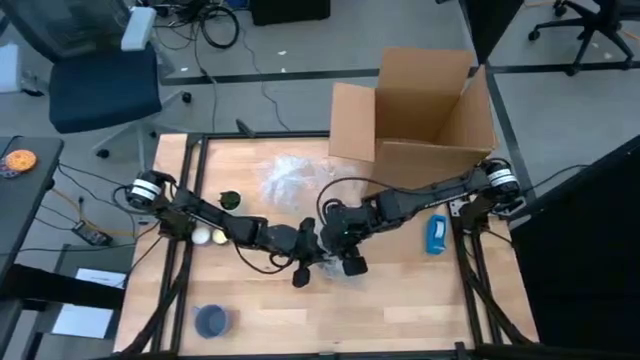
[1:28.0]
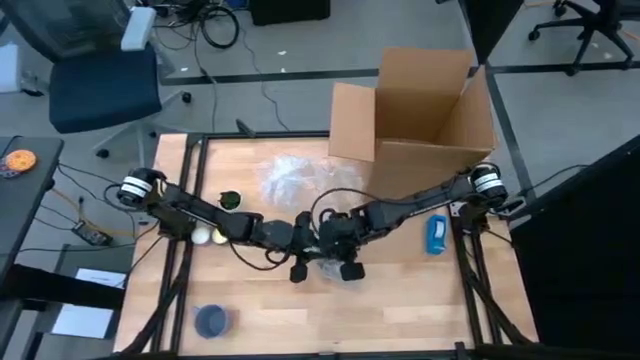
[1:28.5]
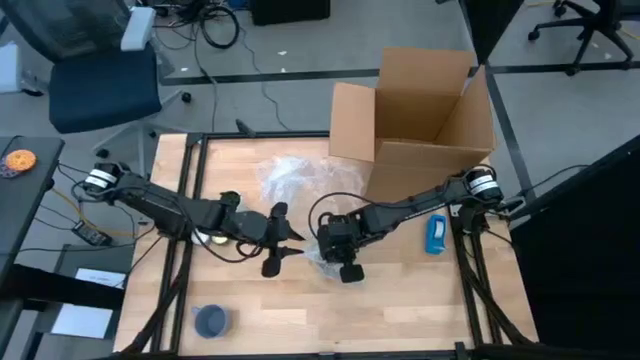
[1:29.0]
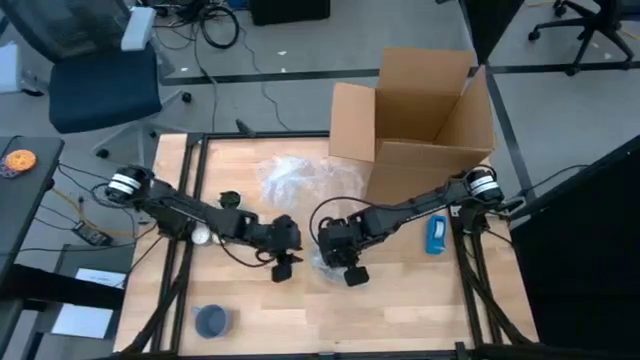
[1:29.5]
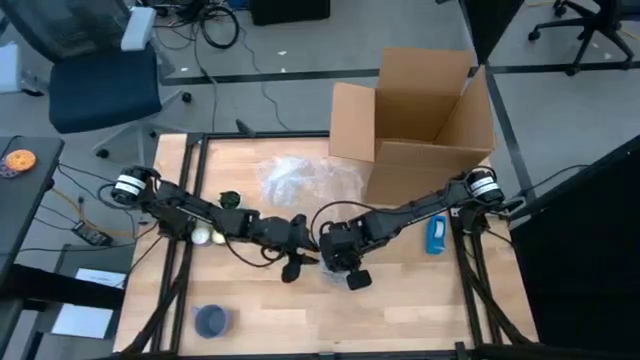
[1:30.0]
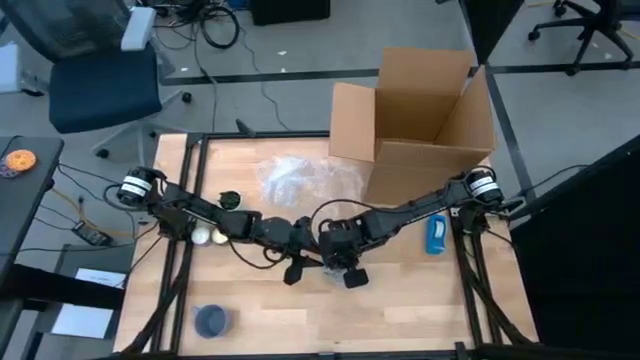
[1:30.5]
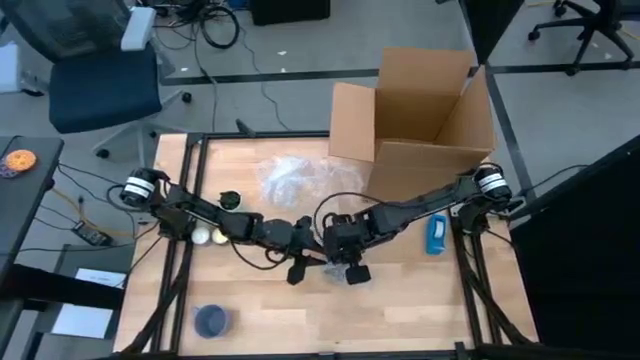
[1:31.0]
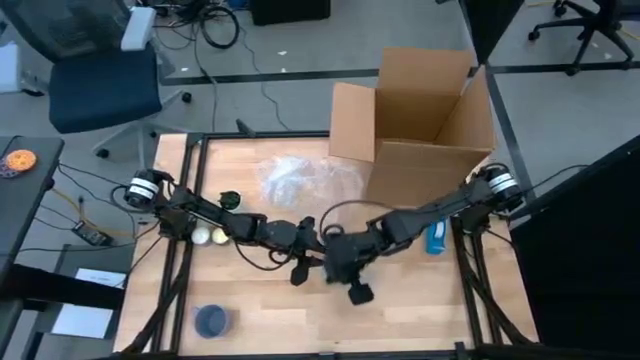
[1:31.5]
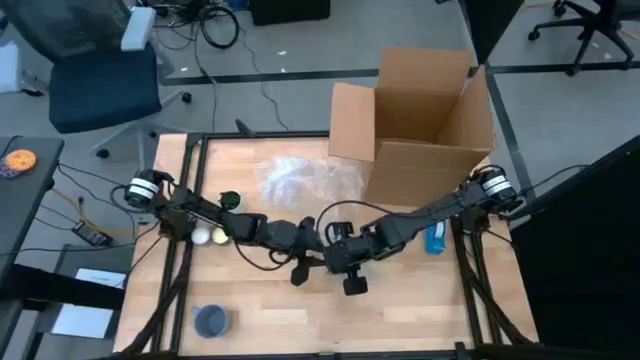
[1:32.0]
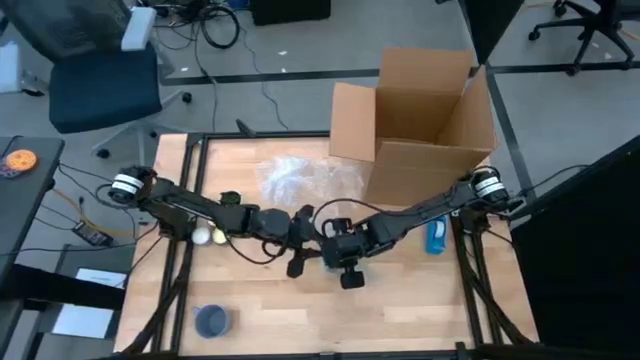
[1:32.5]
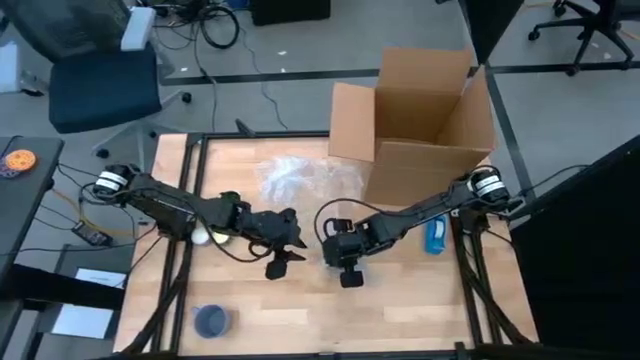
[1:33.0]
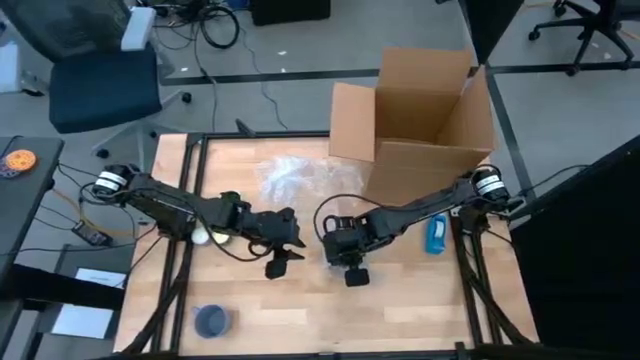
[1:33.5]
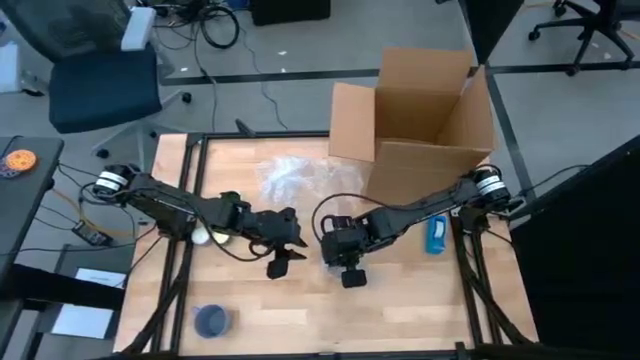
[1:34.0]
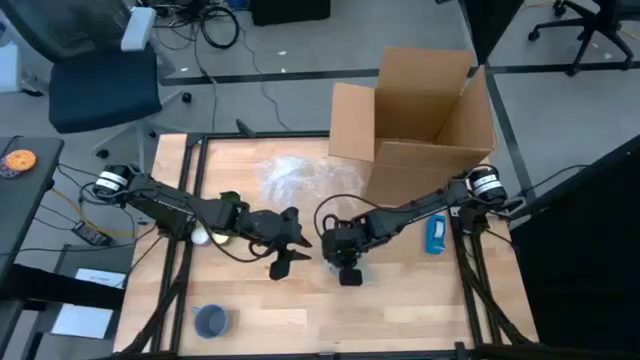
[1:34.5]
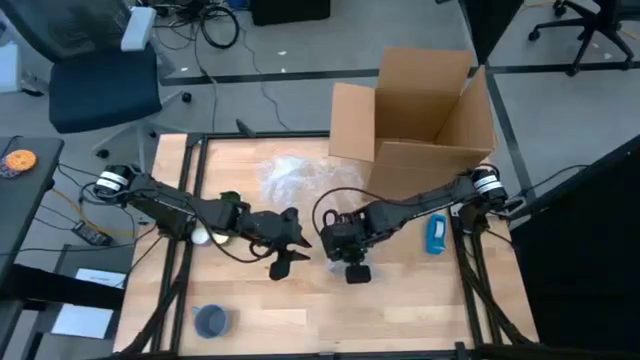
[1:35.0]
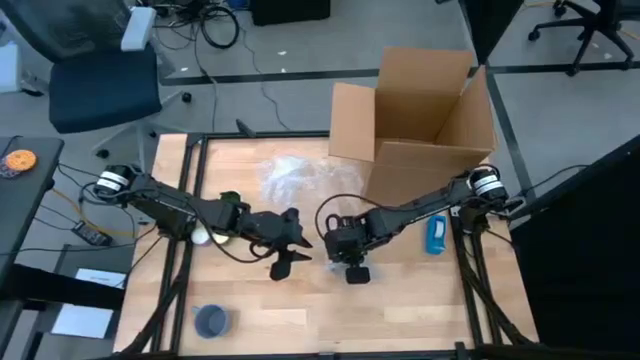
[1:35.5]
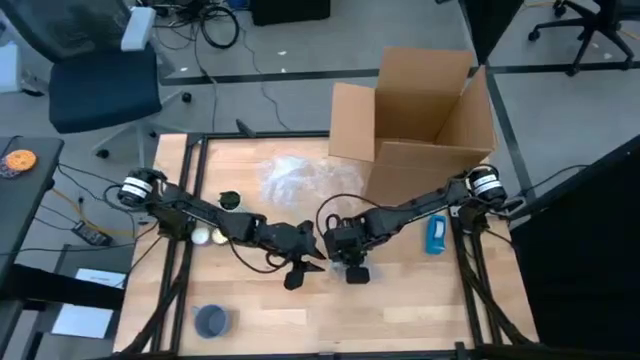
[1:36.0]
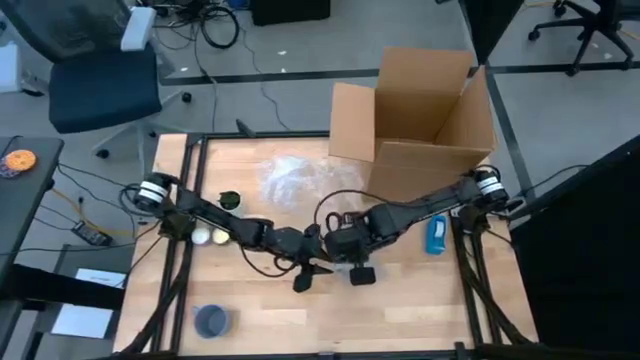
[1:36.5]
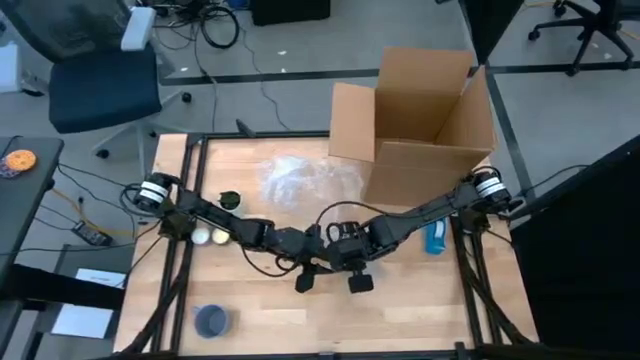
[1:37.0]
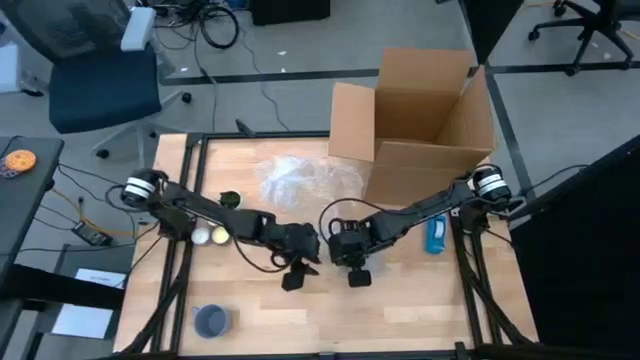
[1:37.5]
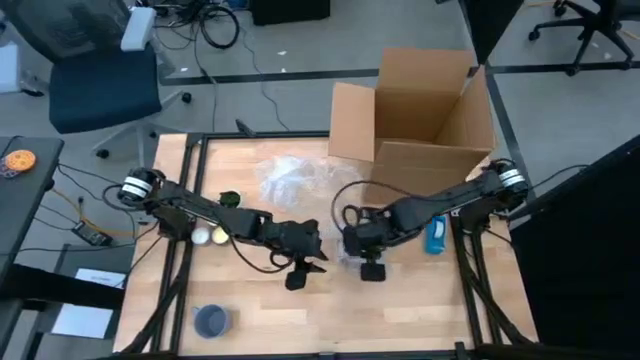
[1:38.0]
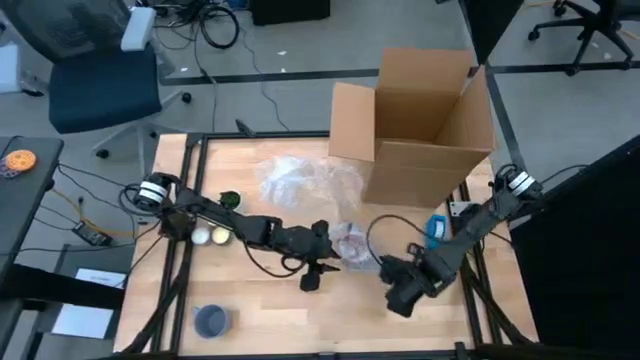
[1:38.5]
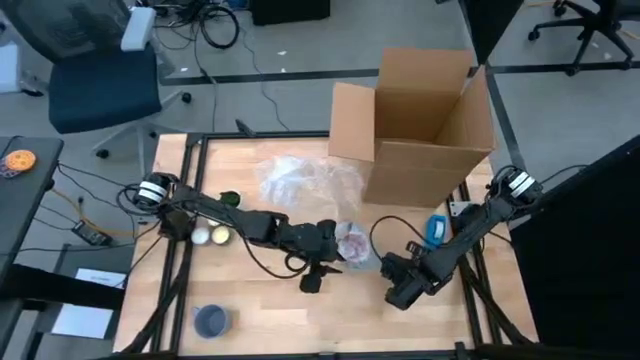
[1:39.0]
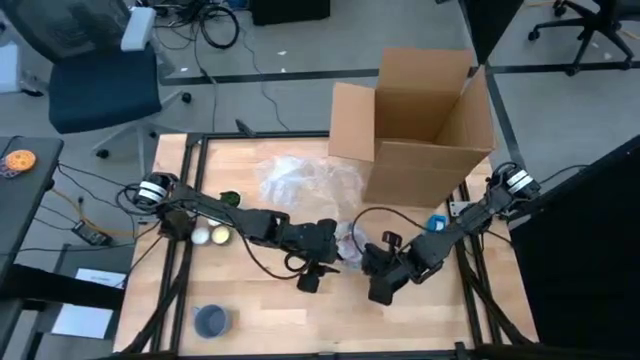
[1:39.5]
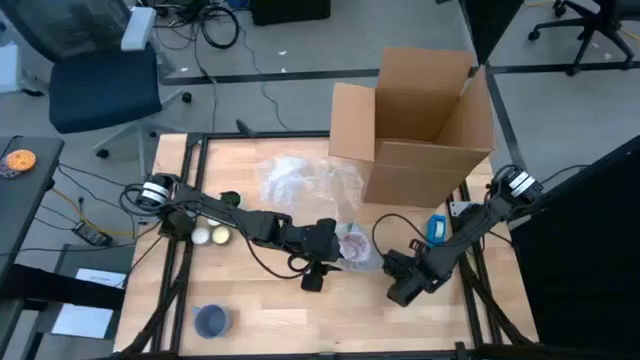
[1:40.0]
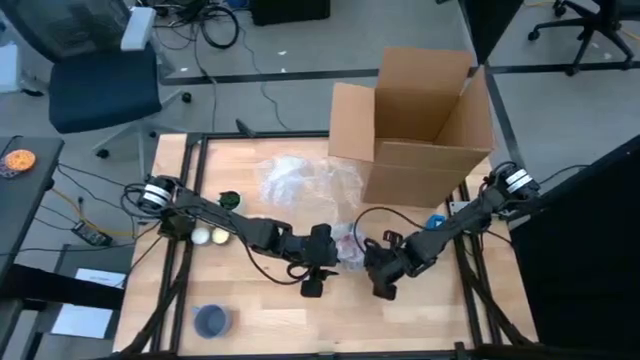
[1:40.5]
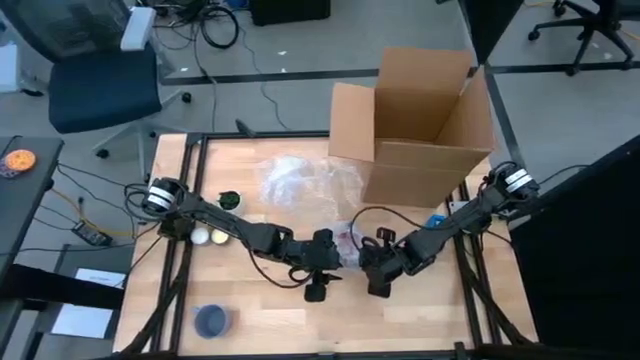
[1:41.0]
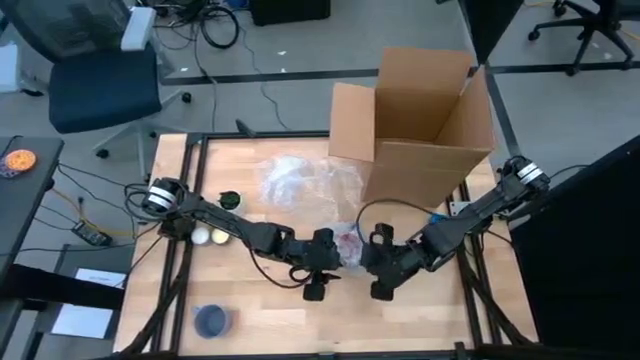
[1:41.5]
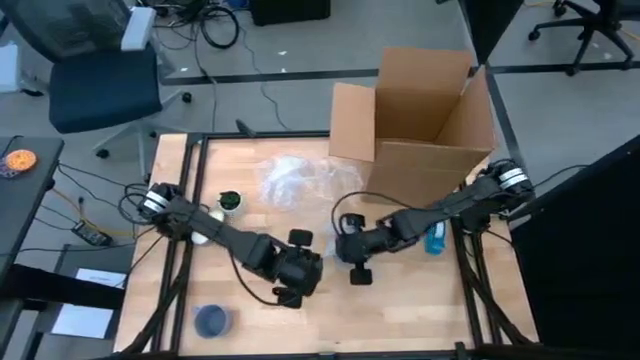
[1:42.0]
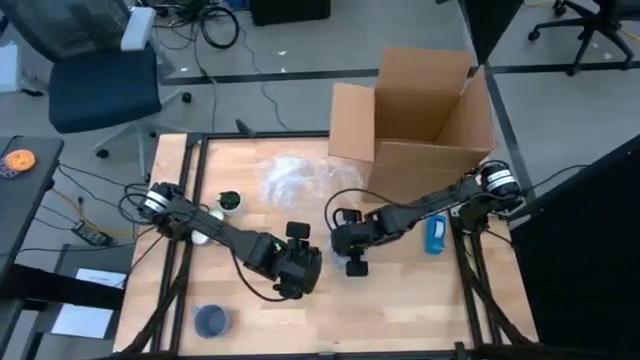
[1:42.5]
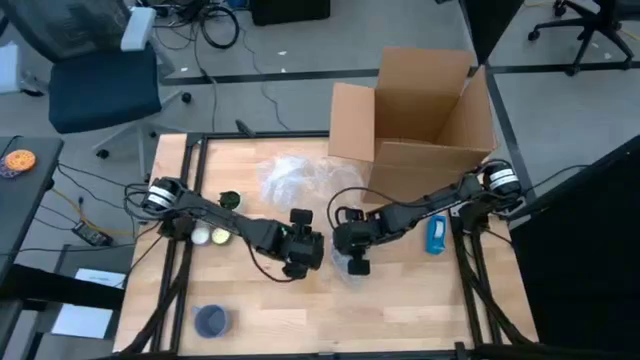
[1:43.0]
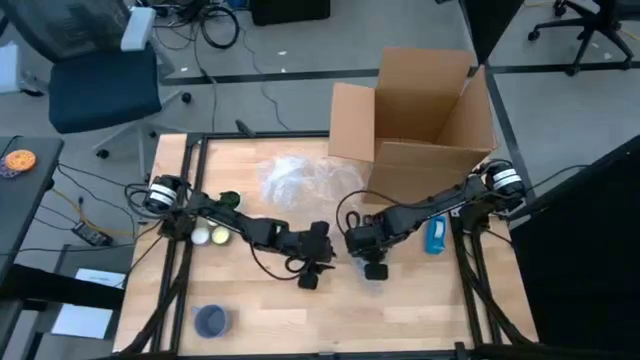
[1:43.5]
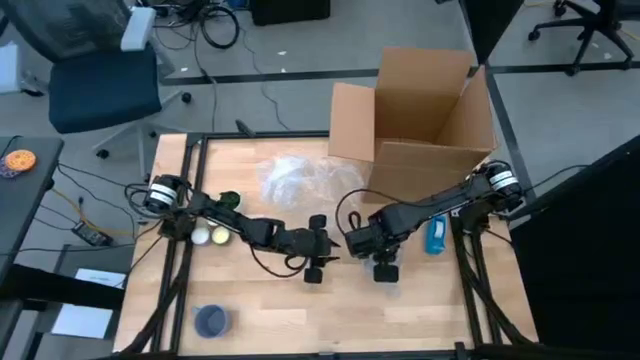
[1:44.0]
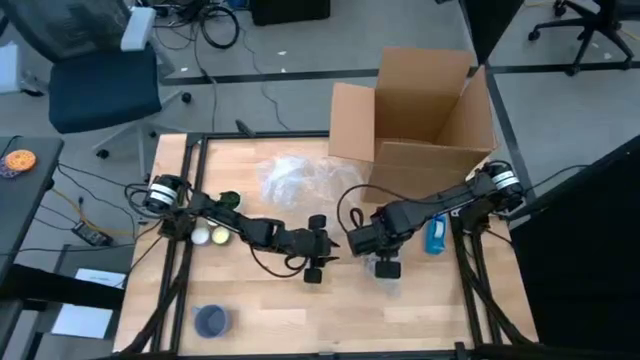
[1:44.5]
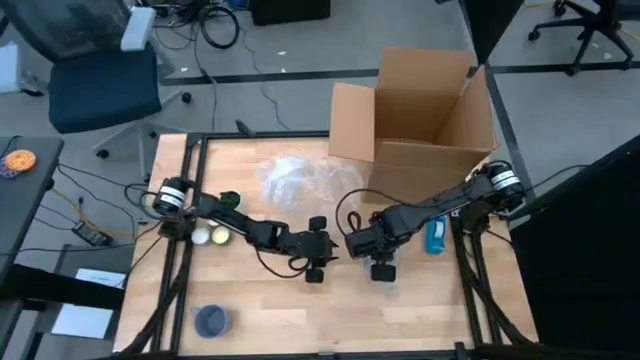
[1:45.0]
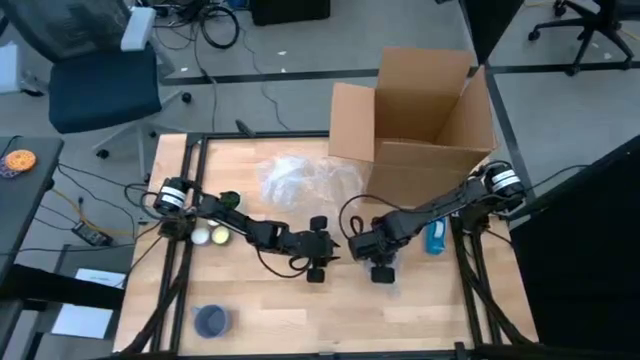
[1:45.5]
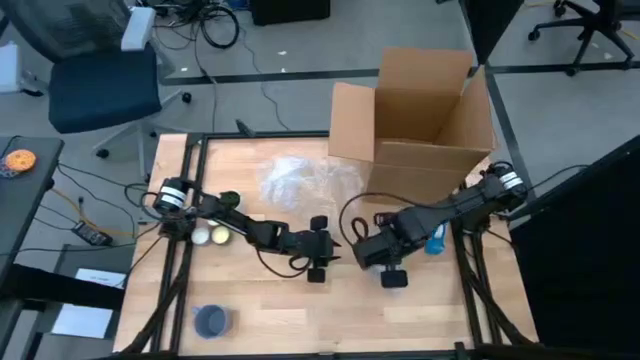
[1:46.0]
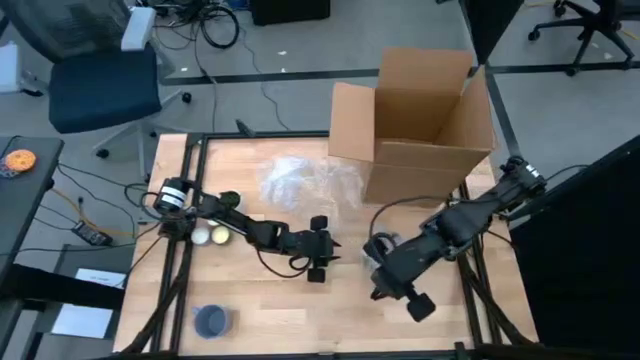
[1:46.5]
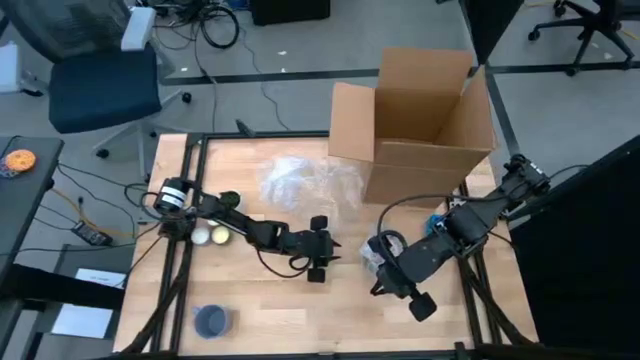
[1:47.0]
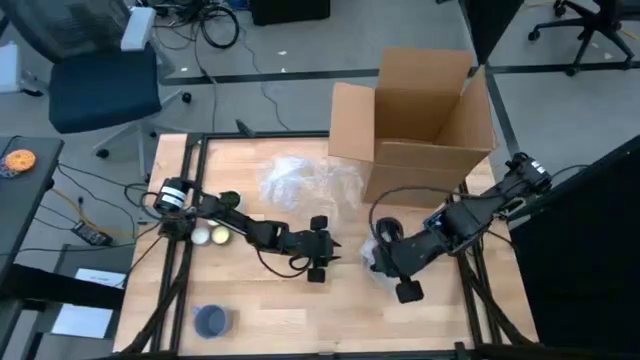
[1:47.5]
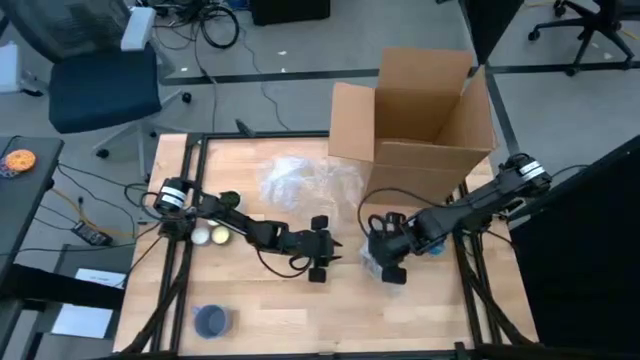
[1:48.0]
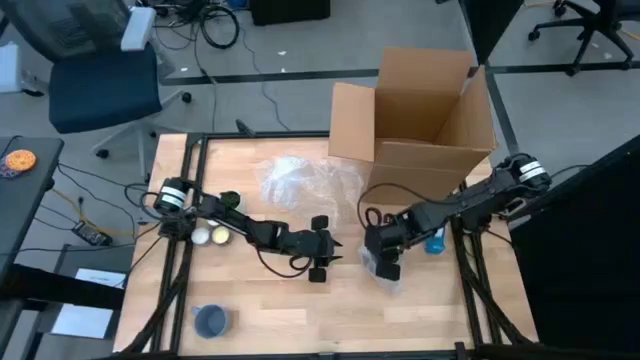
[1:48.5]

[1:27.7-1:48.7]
Task: wrap mug
Wrap the black mug with bubble wrap
